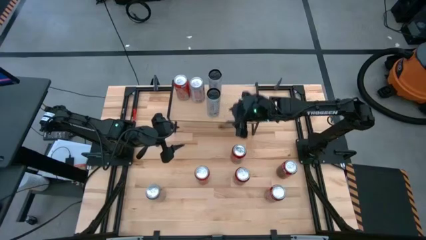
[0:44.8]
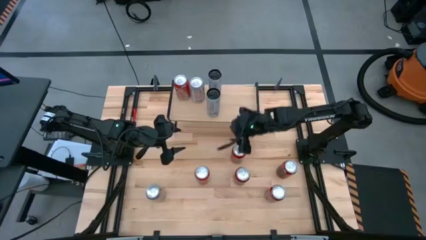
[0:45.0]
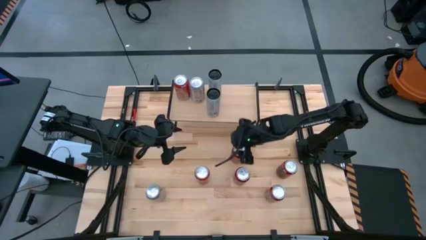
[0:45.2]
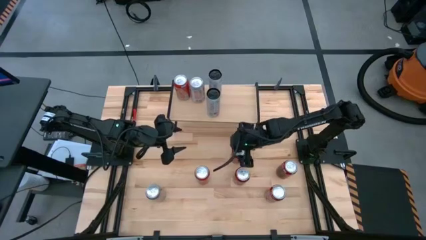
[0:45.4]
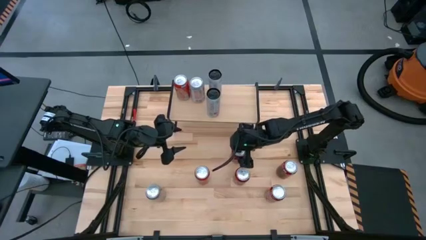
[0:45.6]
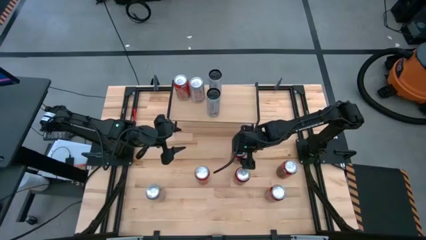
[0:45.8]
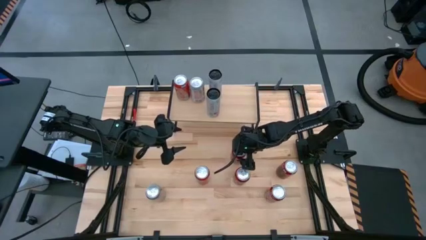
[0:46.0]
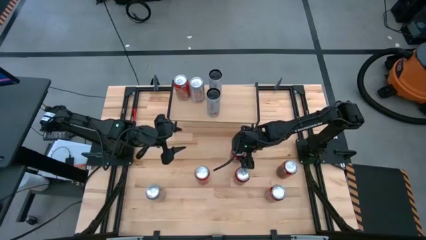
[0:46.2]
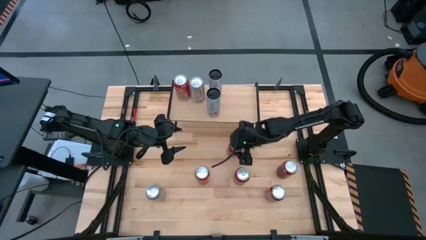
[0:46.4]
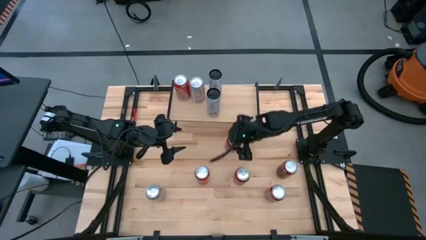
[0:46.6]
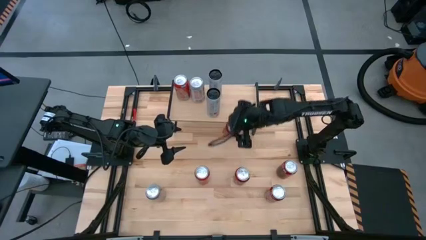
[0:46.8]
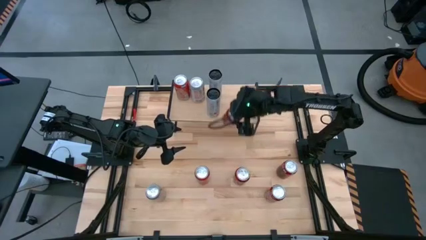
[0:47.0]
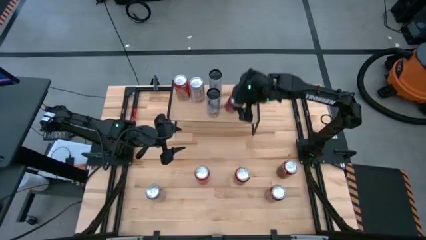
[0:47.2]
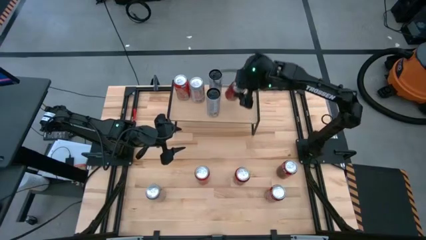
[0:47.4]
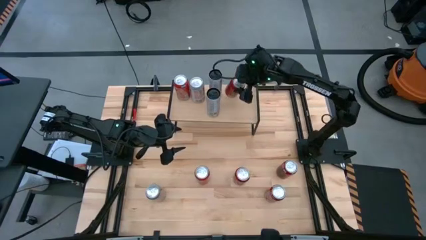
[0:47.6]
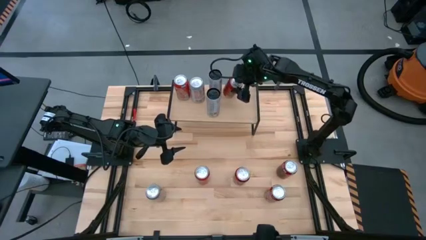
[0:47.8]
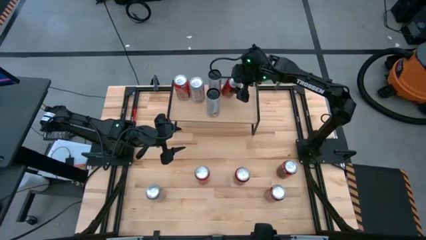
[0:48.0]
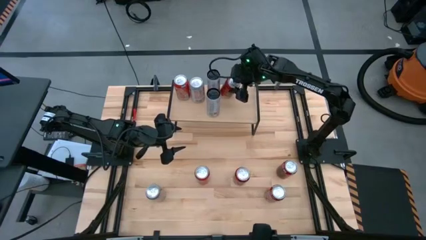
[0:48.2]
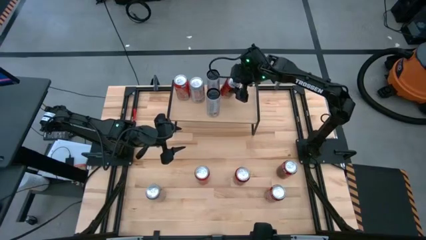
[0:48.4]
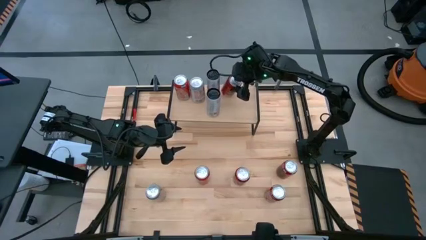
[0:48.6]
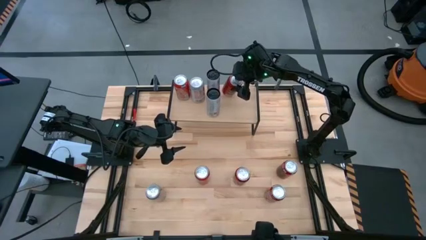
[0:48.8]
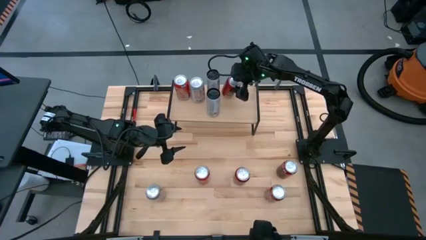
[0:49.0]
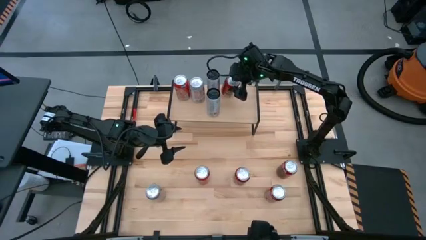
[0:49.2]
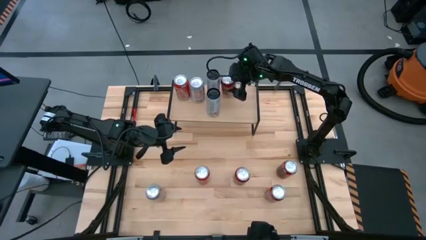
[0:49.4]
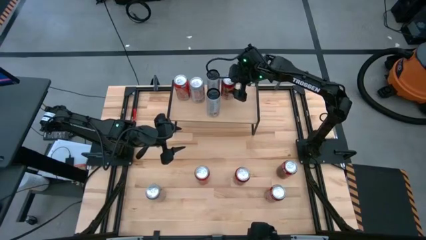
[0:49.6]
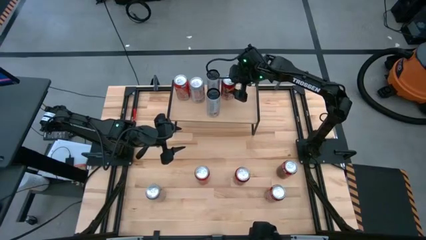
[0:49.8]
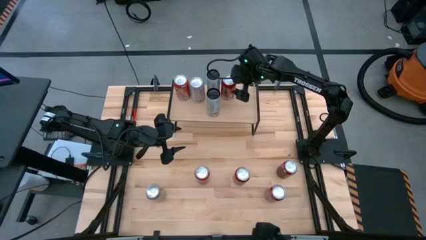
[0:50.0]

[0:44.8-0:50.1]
Task: Place canned beverage on shelf
Put the top red and black soda can on the shelf

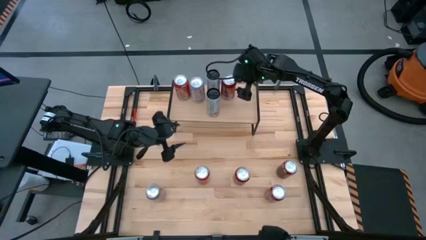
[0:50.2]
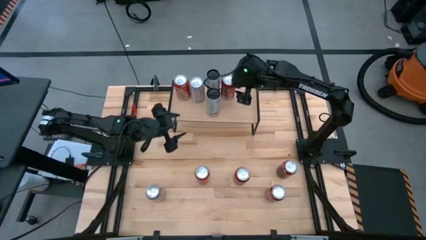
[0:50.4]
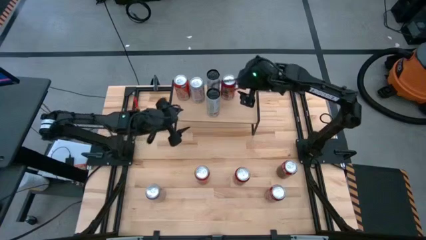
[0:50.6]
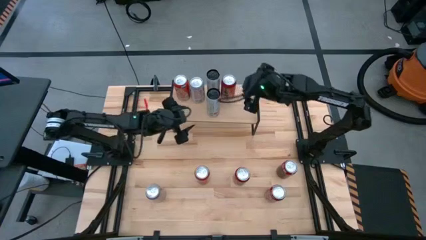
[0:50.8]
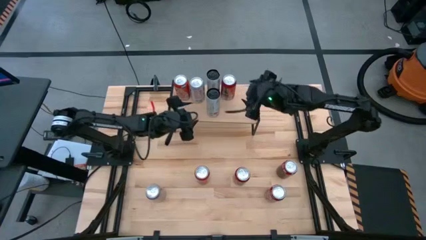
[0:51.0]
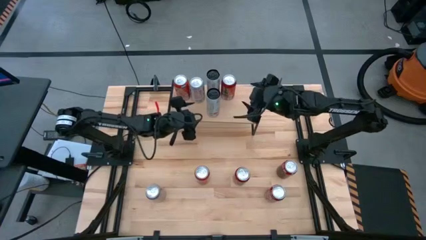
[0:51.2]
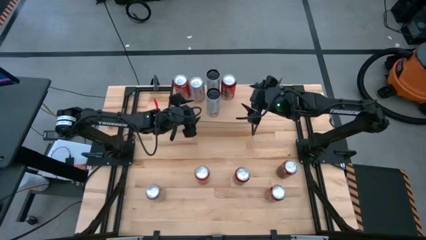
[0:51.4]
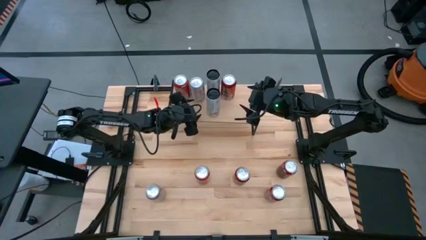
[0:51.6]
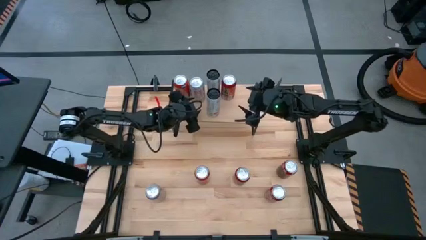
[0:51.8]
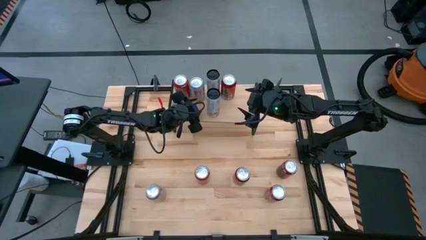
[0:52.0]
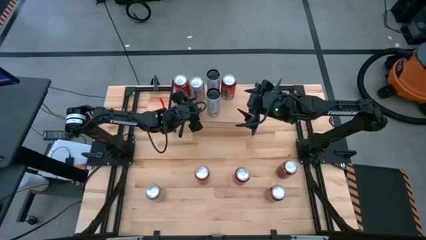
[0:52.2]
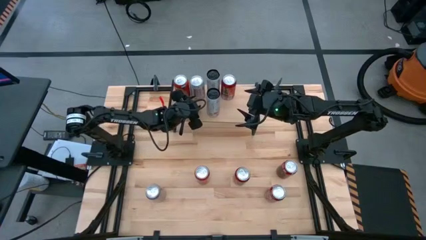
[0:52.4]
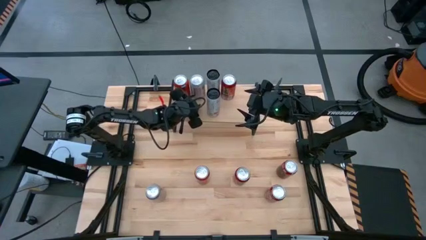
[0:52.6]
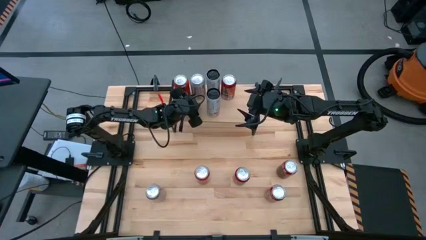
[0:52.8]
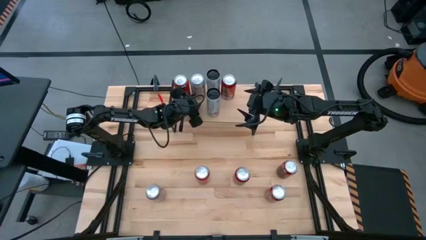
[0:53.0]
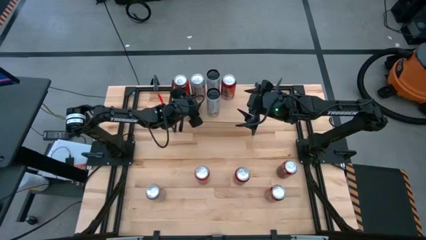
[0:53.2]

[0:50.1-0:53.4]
Adjust the red and silver soda can on the shelf

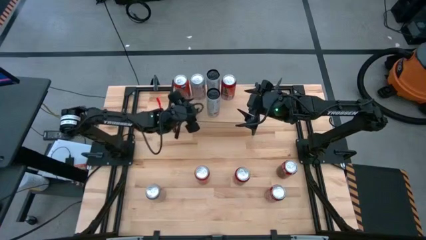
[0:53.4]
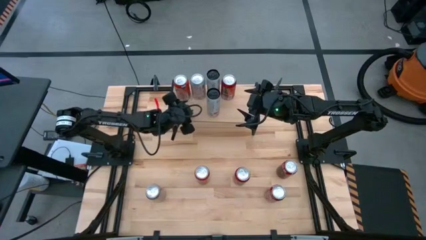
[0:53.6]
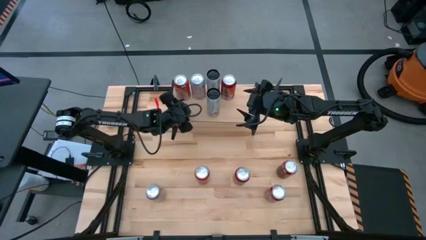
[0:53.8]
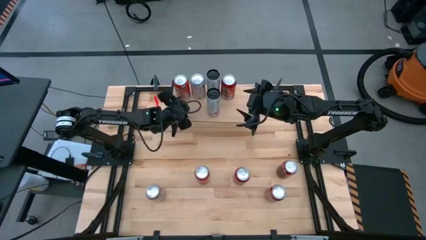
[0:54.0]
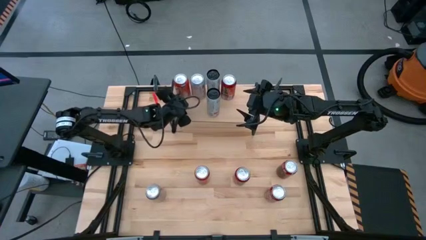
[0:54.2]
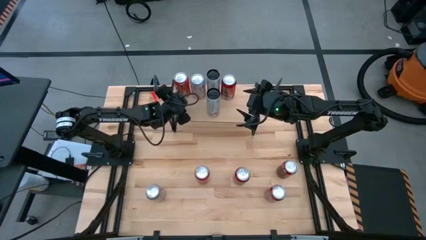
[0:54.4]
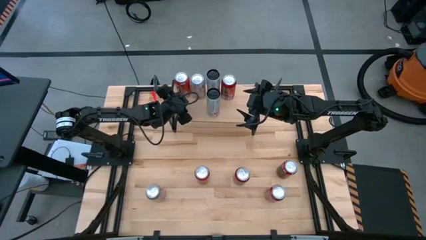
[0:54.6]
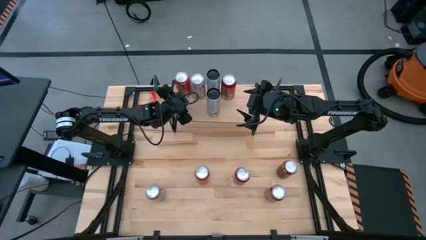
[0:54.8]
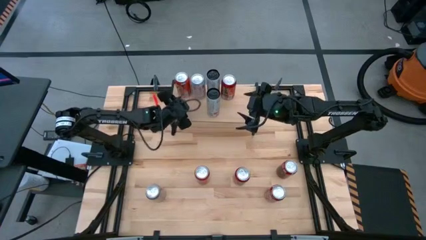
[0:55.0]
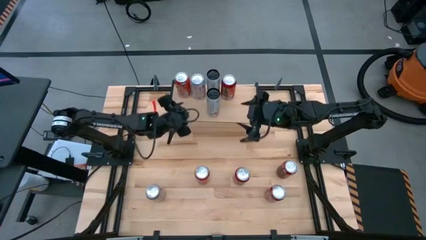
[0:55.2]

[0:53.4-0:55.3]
Adjust the orange soda can on the shelf

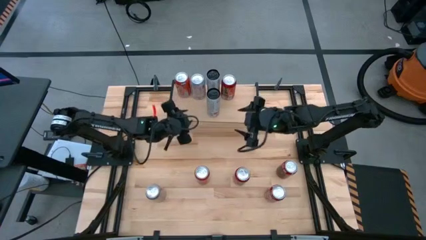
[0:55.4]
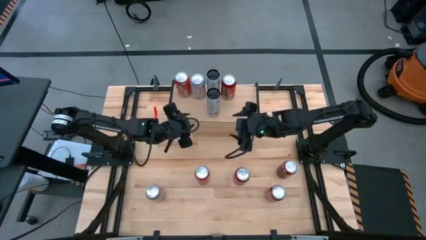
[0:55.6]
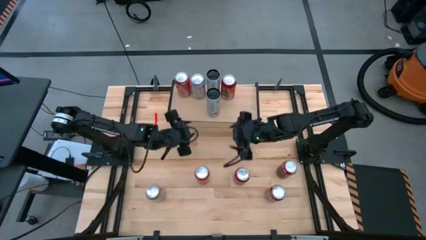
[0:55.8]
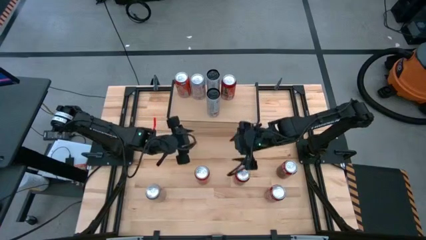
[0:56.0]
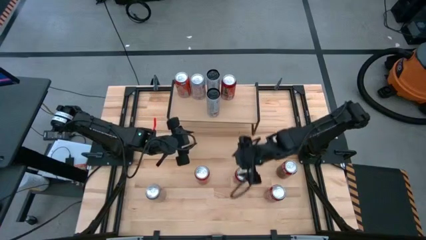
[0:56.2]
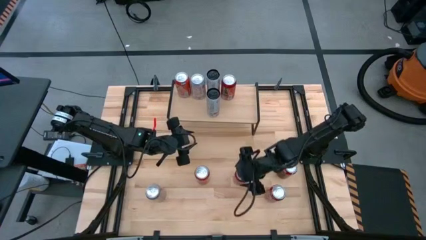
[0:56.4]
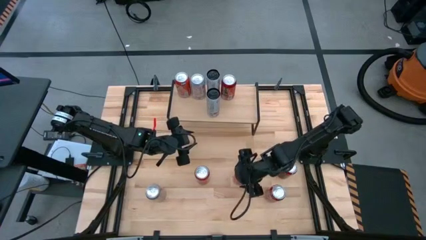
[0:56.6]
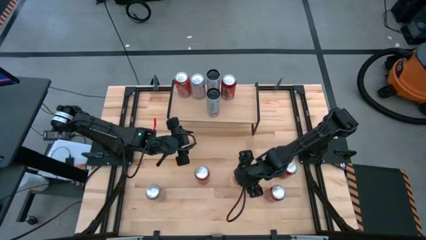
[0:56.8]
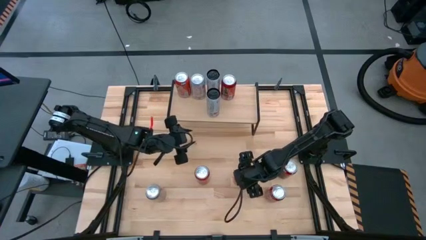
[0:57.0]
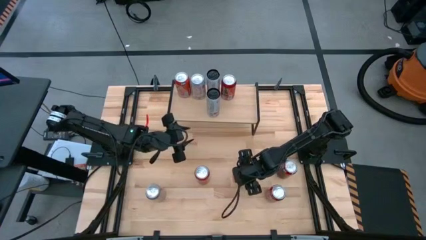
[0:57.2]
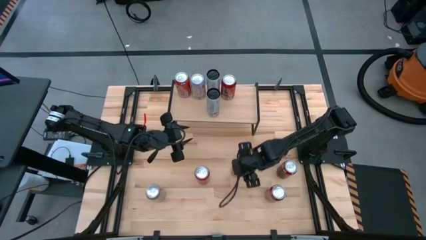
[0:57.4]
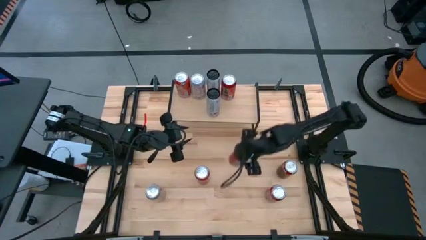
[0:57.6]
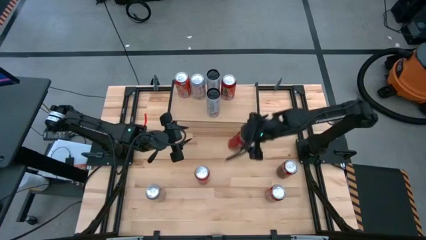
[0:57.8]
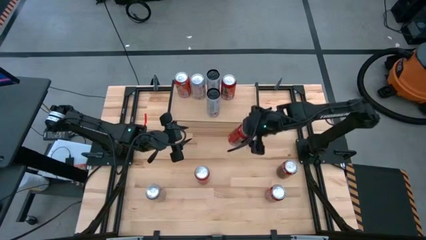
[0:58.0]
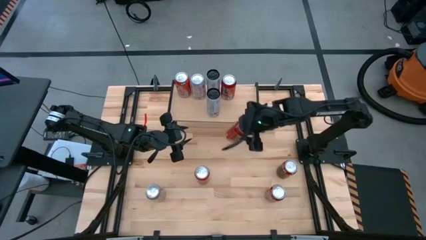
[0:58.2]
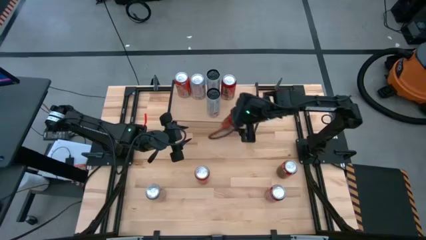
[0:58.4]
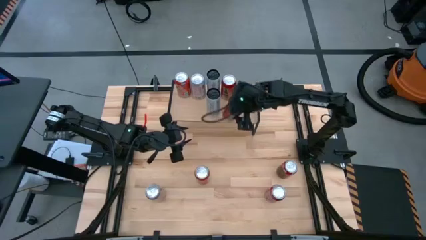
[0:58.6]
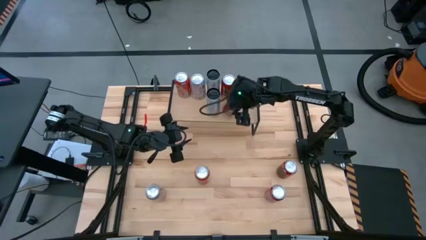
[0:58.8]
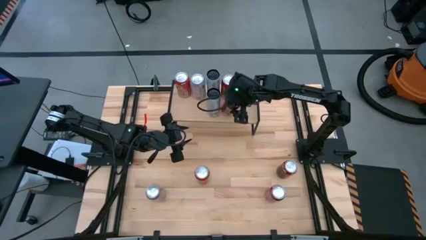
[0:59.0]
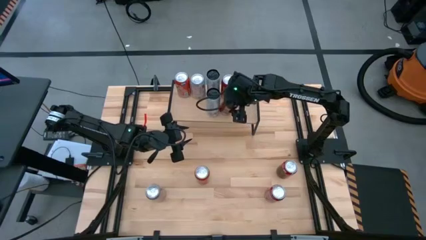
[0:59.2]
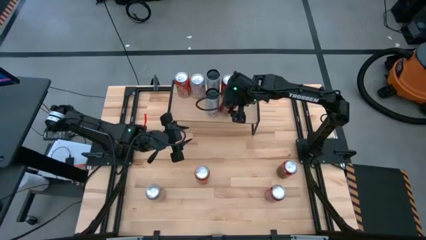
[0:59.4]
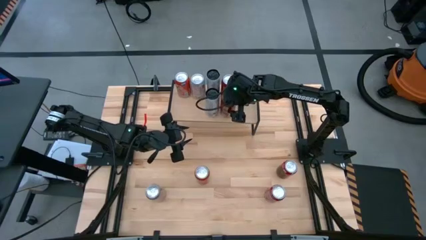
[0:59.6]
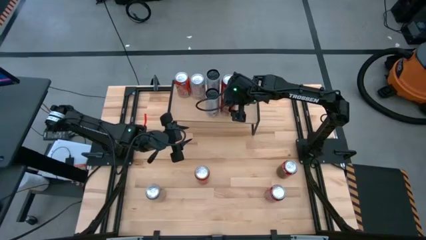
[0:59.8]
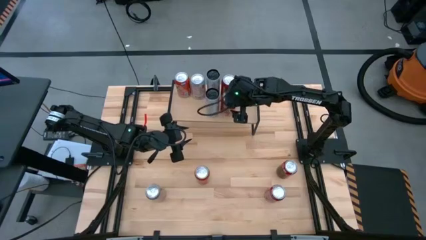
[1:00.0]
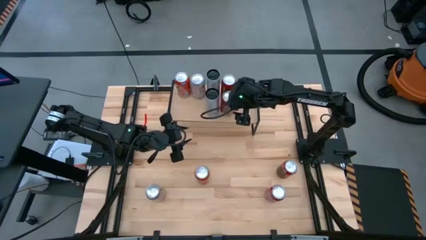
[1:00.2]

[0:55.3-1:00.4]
Put the red and black soda can on the shelf

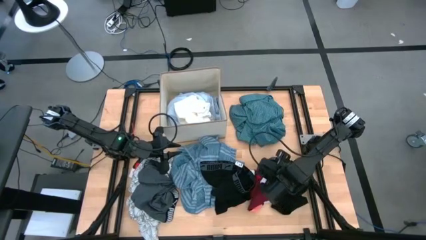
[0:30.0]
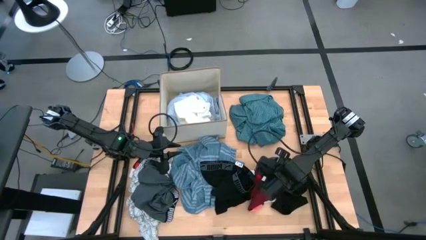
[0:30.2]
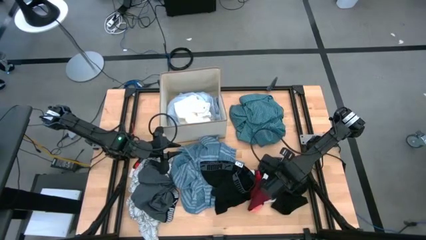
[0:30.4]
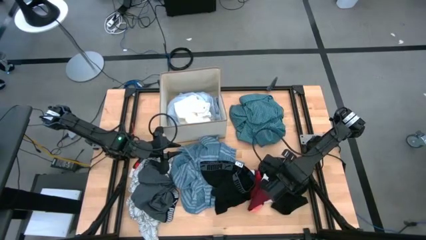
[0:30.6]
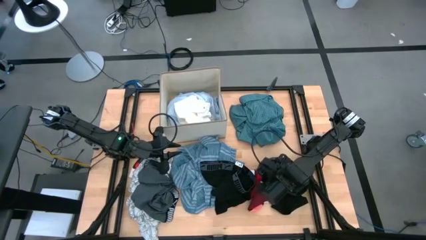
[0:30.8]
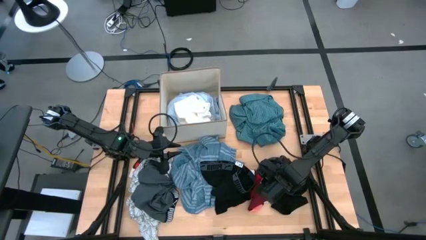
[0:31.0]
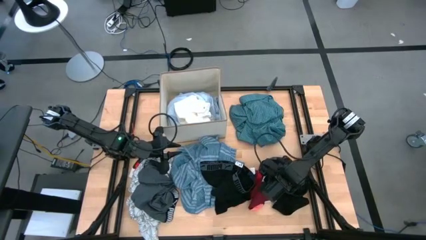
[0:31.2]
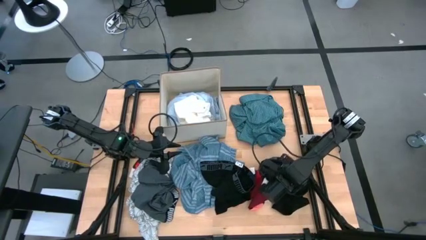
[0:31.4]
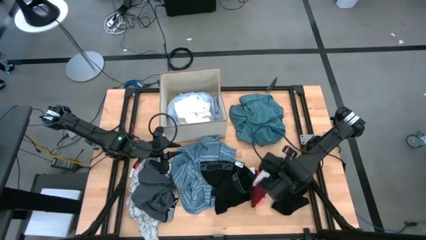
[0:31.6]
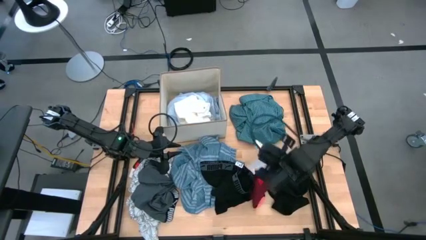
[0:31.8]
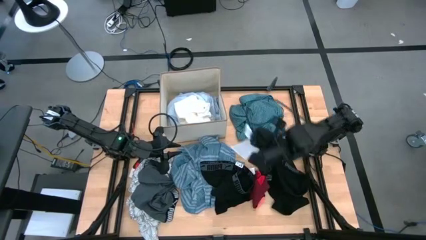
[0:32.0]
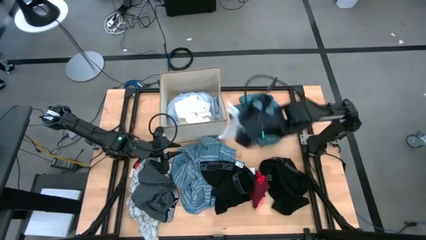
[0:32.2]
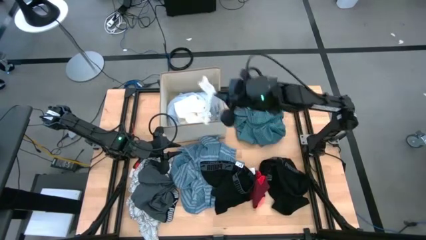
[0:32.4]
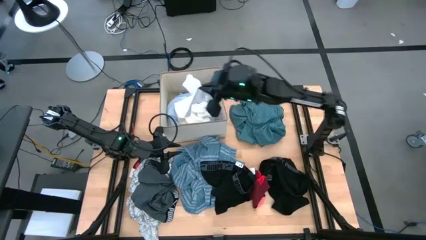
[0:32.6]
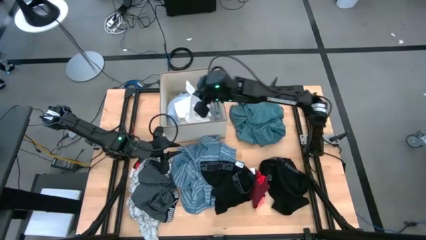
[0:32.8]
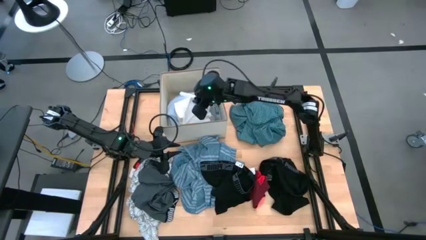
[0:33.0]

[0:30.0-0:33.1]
Task: Sort clothes
Put the white sock into the white laundry organizer
